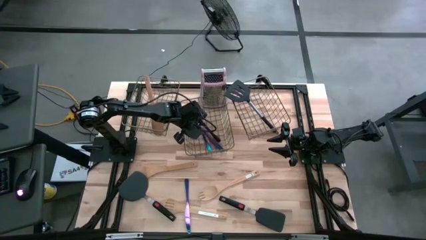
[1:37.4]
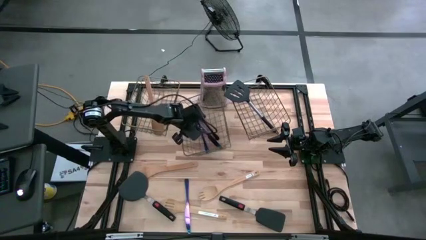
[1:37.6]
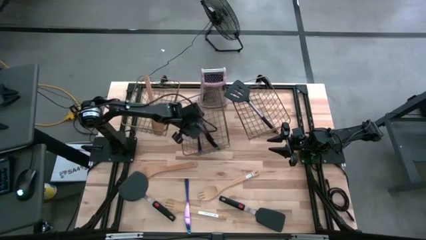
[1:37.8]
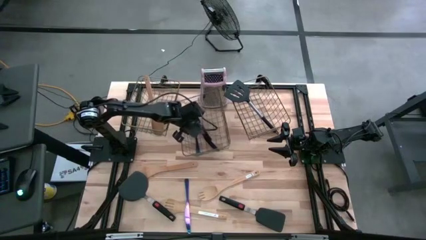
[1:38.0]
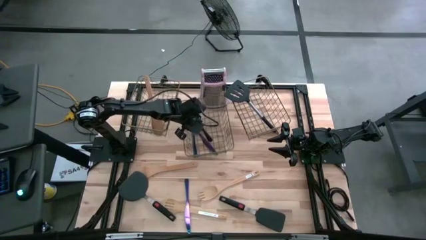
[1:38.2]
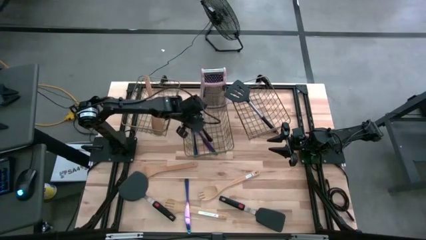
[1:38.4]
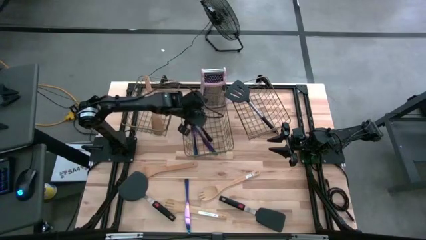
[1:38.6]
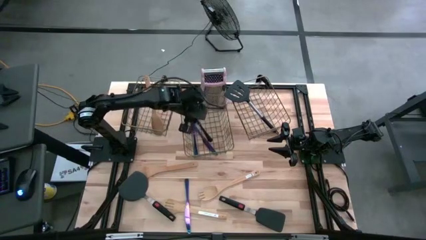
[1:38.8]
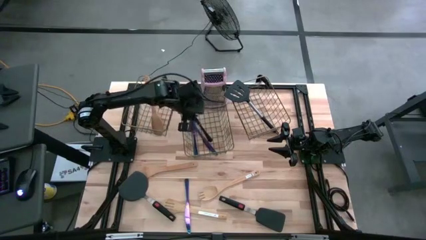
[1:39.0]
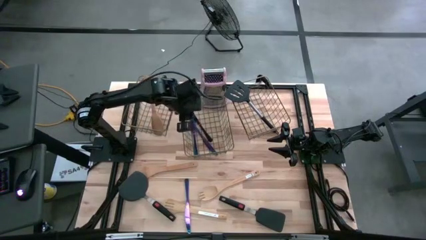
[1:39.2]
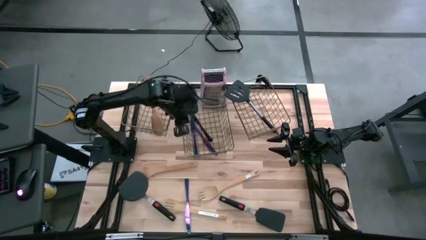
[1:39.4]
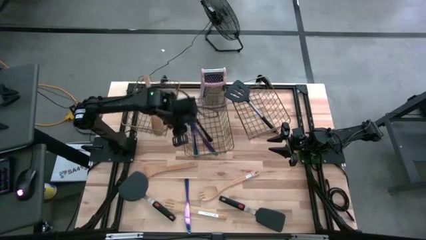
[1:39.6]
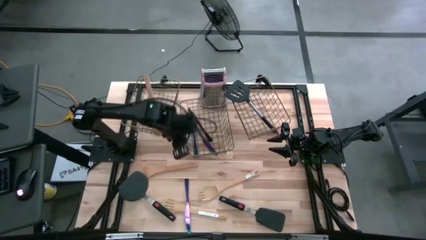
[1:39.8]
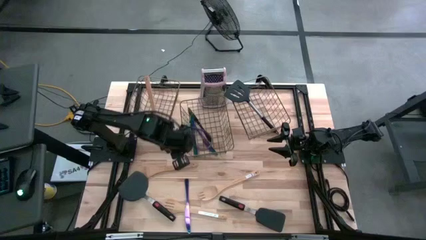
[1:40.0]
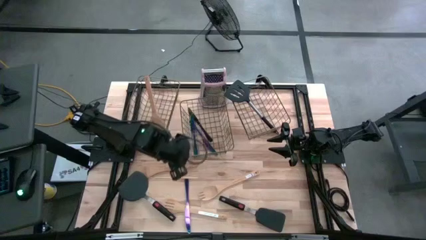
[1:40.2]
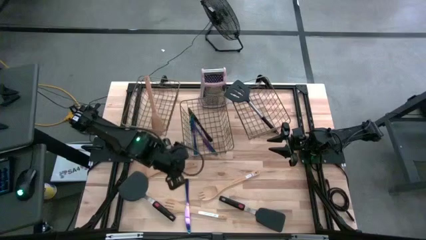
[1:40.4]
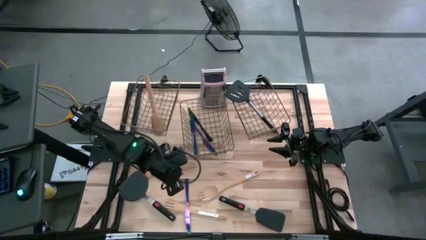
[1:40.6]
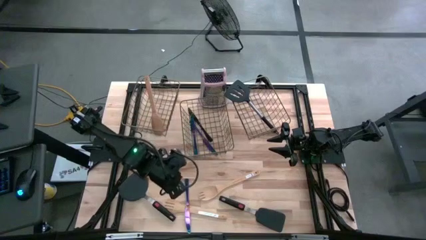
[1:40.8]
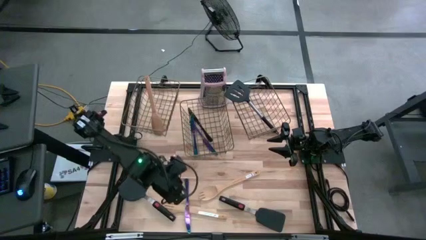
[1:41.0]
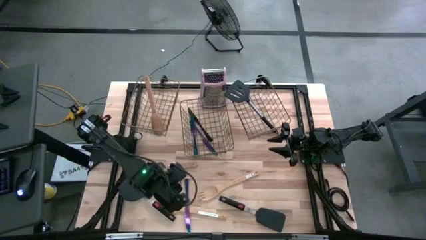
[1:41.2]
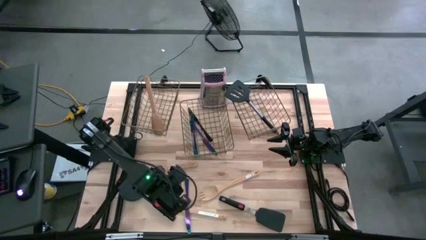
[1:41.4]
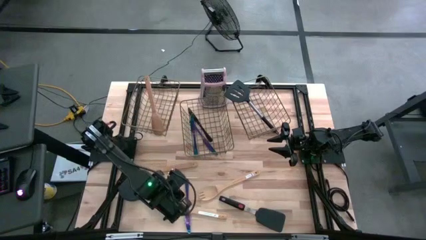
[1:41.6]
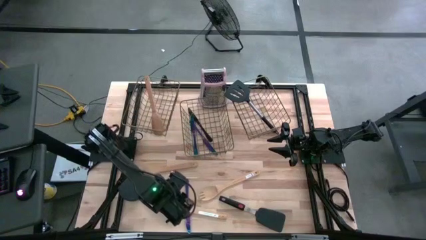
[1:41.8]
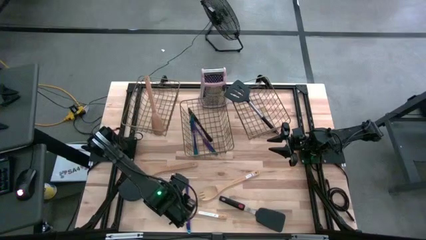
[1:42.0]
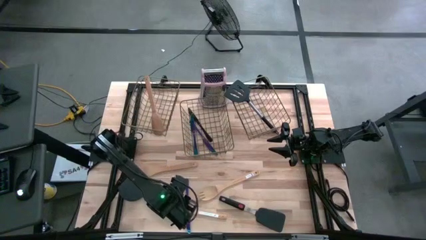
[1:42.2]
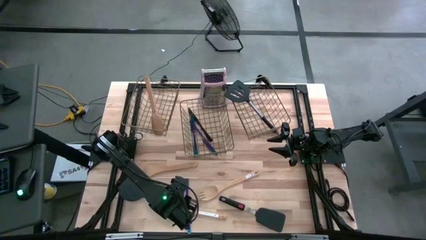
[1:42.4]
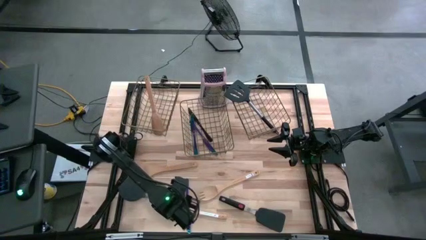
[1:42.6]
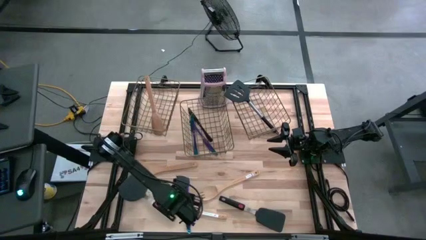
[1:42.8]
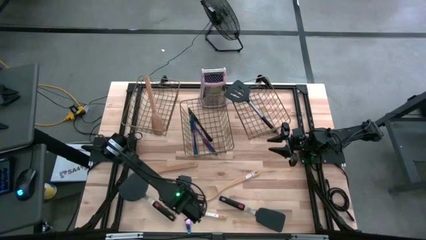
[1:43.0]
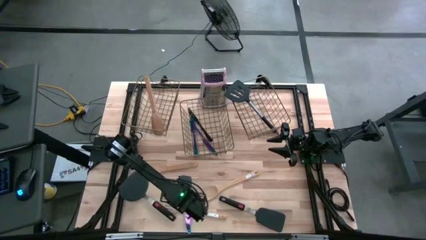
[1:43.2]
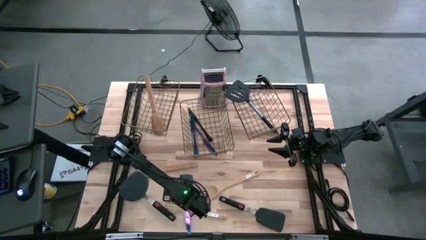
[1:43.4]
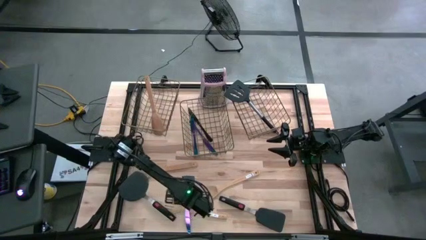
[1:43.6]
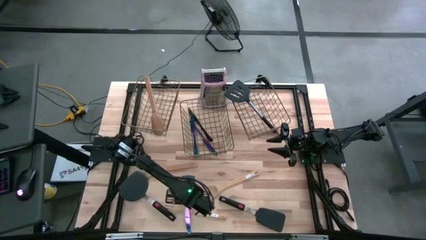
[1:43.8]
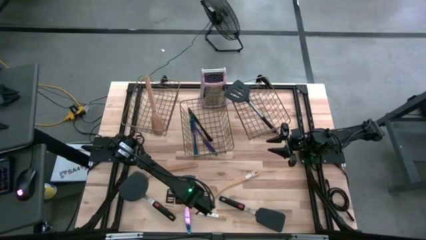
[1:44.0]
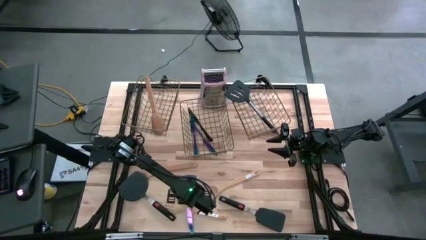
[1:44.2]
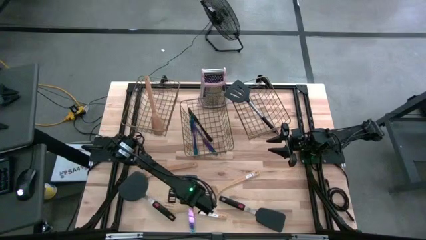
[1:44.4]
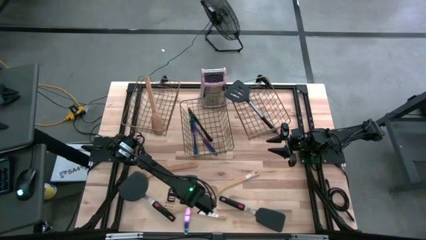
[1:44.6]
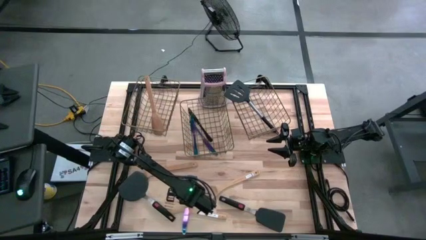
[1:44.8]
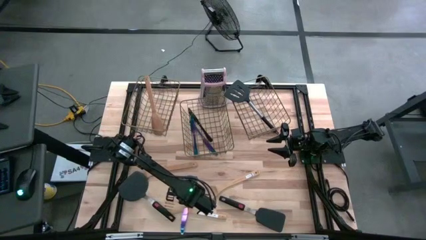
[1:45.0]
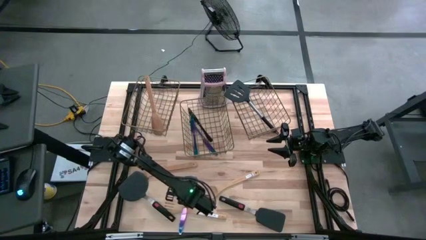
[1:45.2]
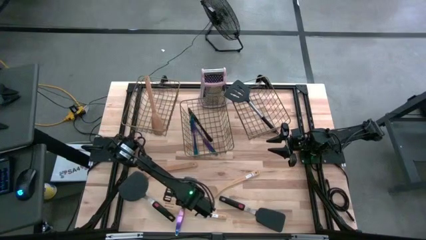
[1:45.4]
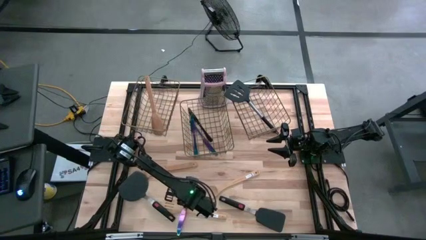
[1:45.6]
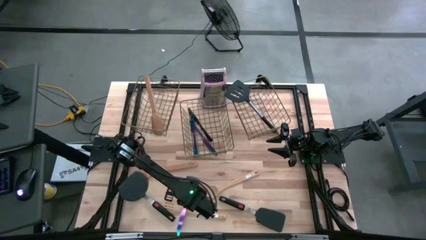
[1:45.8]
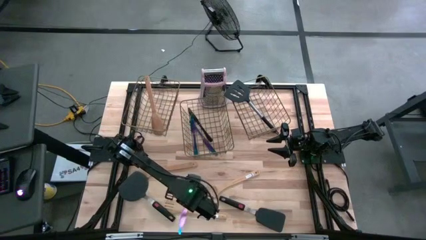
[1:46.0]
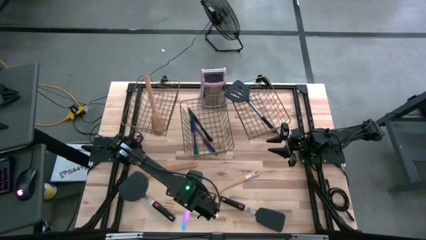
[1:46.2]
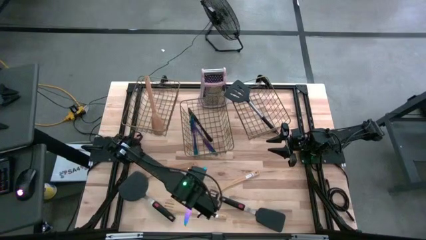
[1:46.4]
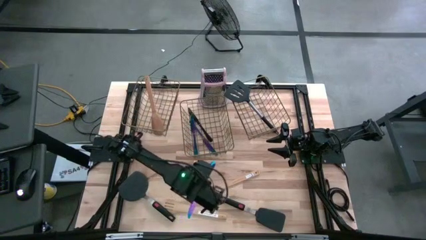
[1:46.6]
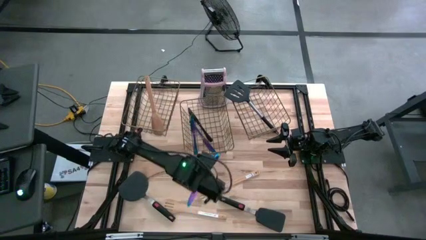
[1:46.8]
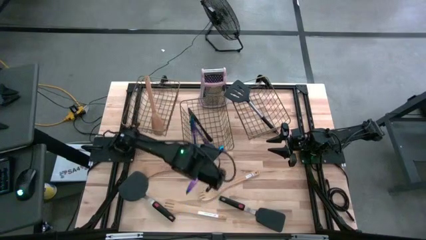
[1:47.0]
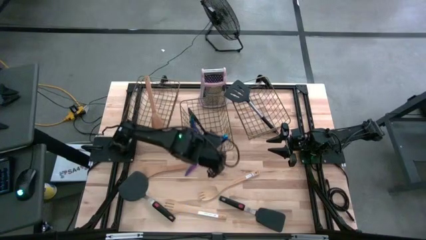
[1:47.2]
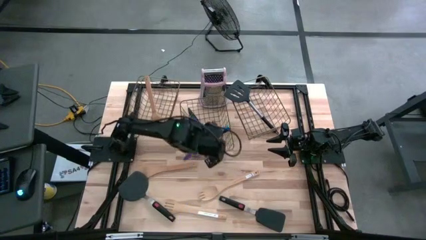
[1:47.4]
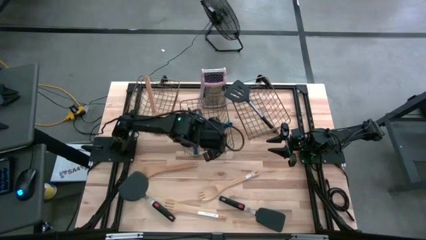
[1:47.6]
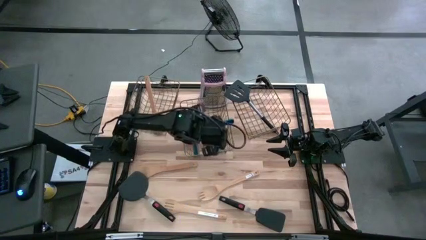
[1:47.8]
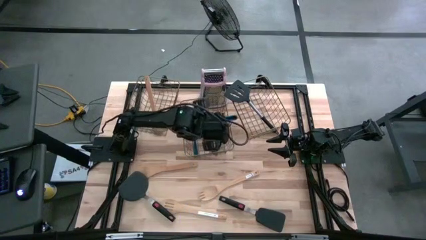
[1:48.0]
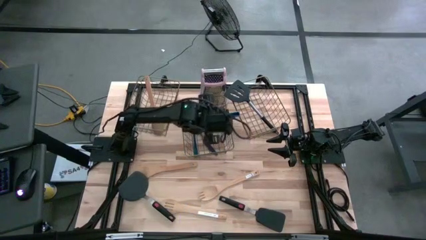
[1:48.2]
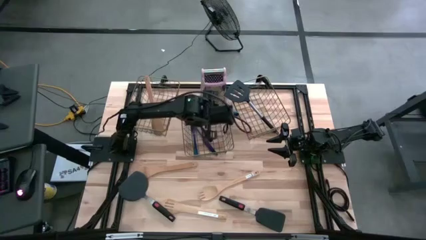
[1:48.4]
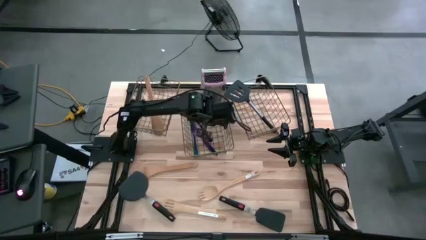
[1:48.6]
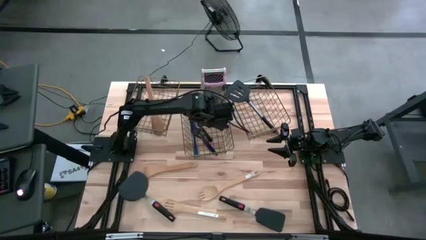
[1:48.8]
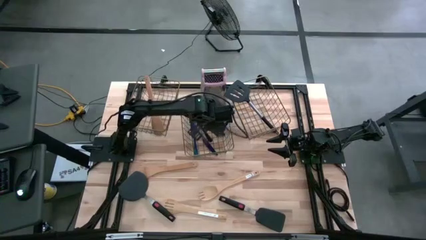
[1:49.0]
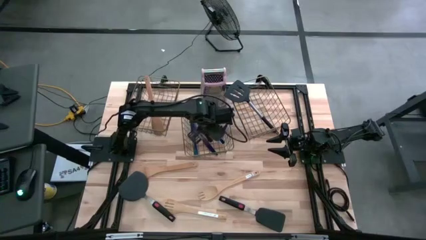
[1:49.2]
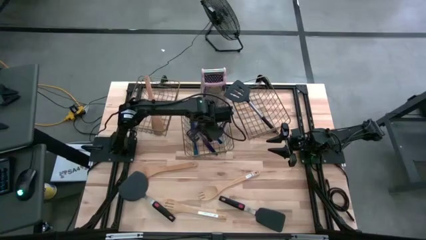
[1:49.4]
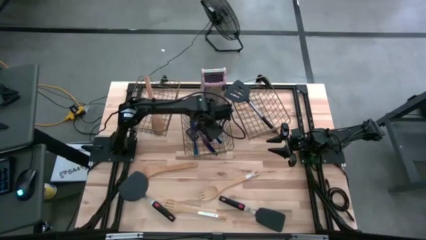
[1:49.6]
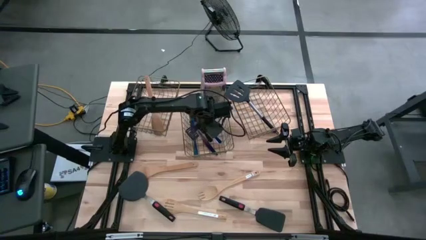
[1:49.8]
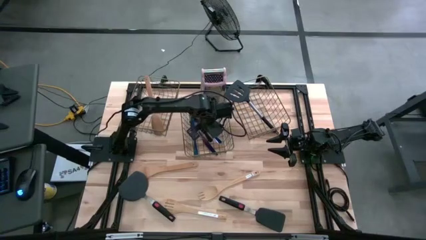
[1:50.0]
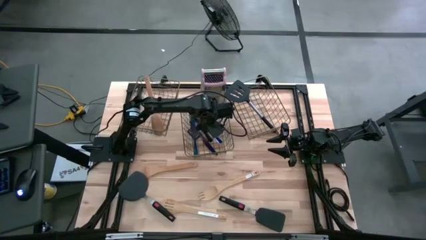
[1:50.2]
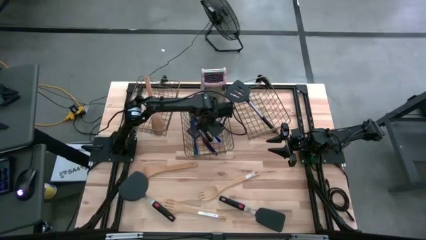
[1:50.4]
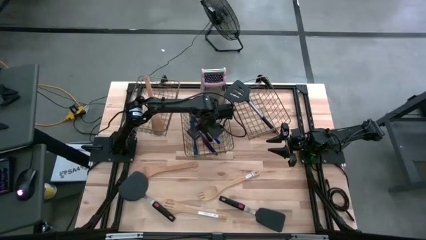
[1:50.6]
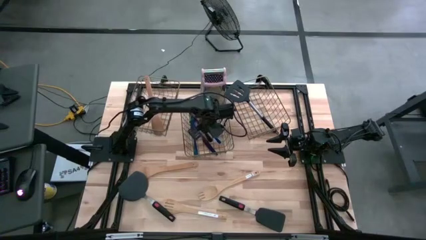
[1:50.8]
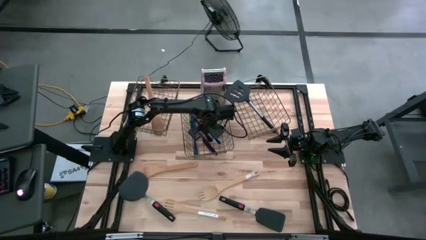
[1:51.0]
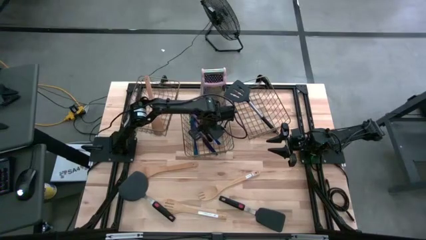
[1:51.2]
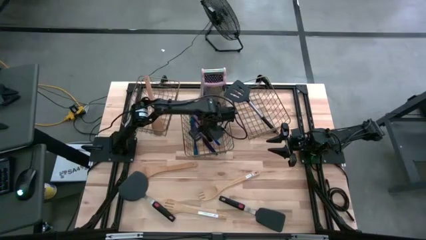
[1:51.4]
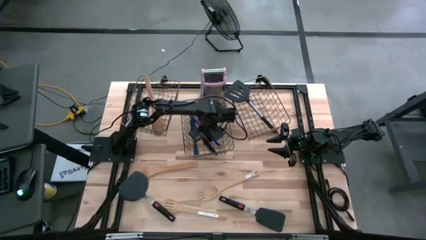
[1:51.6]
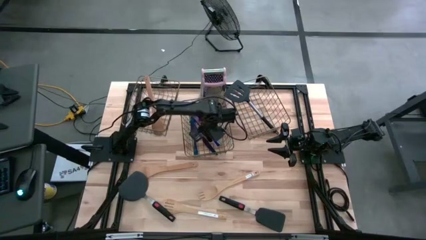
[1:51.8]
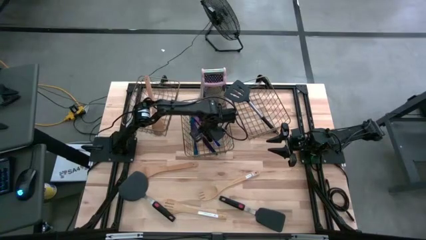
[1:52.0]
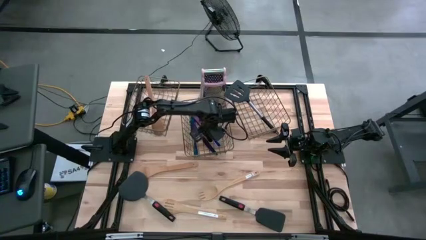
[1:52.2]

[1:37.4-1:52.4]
Task: Pick & Place Kitchen Items
Put the blue table knife into the middle wire basket

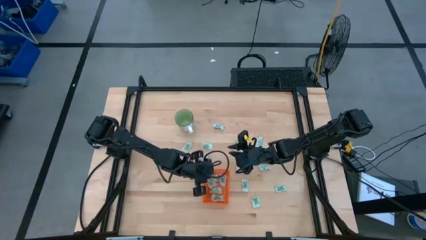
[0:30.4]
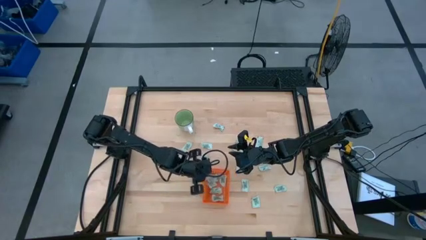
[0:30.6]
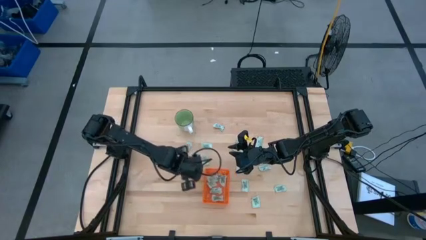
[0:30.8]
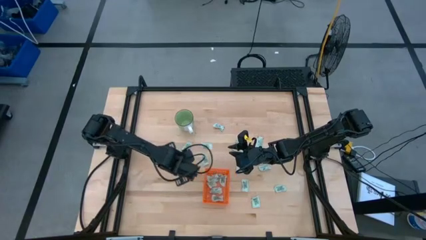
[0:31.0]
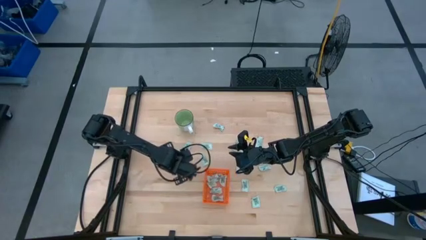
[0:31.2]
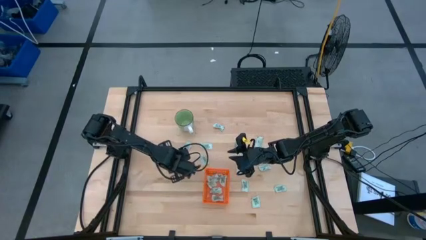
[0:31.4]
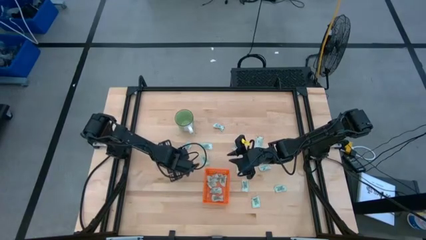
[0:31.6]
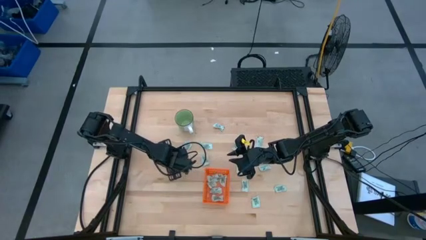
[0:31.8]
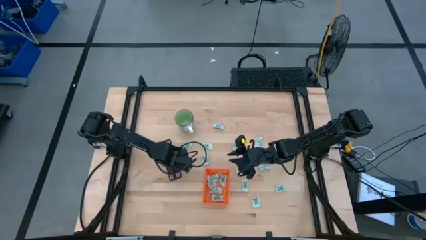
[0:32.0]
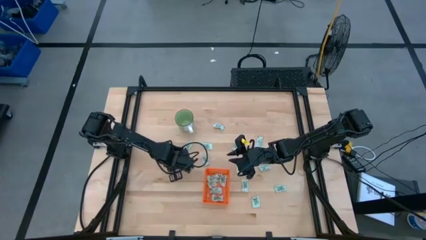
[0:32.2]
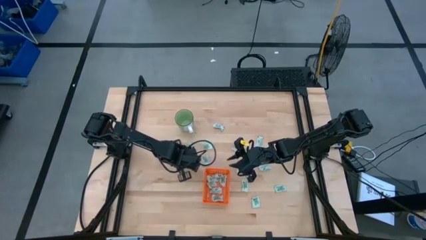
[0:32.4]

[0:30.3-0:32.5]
Task: Pick and place Stevia / Truvia into bins
Put the stevia packet into the orange basket

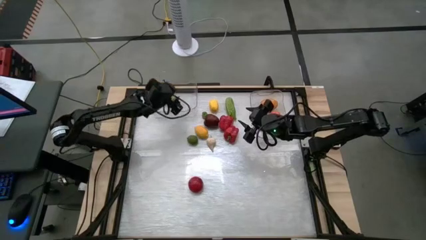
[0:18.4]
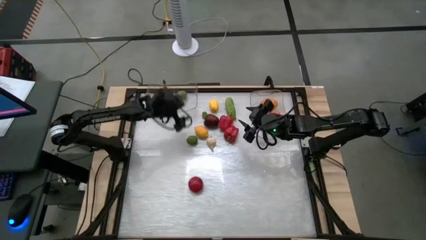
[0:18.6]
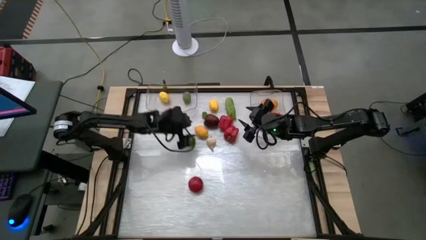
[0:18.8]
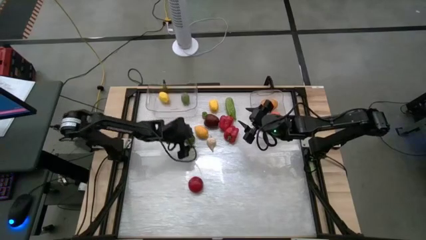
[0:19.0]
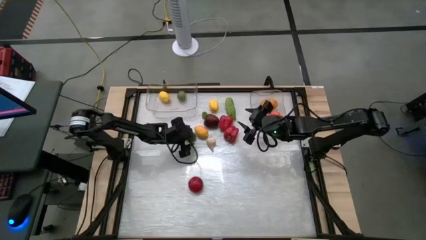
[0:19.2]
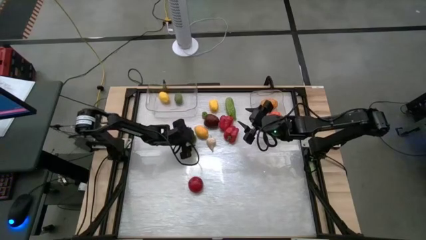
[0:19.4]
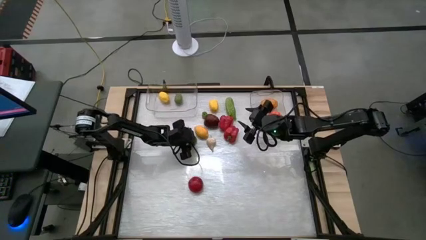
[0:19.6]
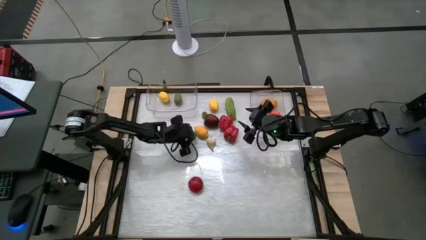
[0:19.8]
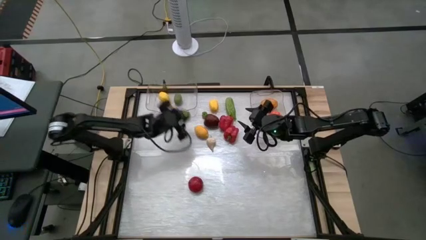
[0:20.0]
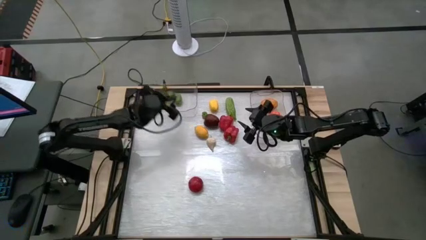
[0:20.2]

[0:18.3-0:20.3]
Task: Sort produce into baskets
Put the green lime into the left transparent bin
